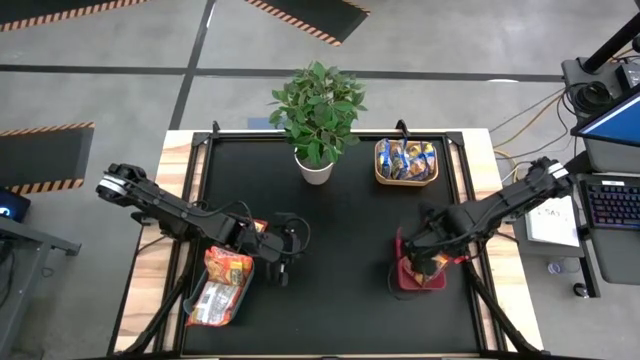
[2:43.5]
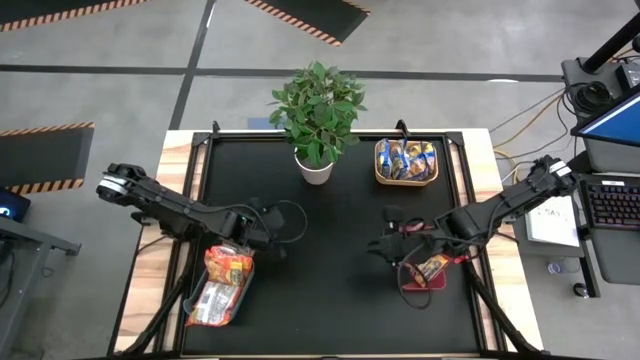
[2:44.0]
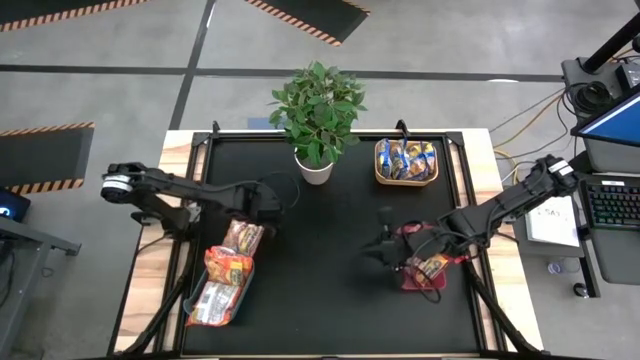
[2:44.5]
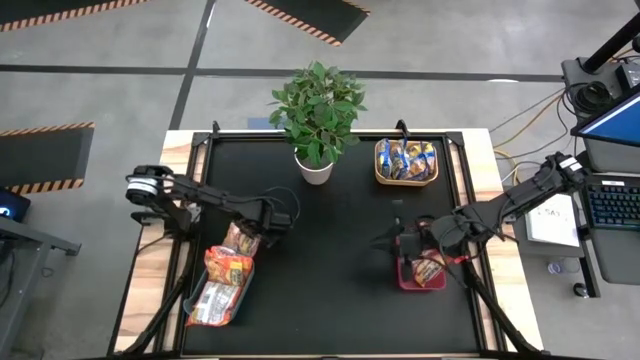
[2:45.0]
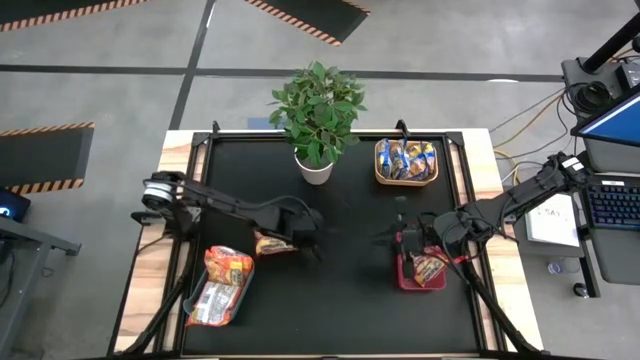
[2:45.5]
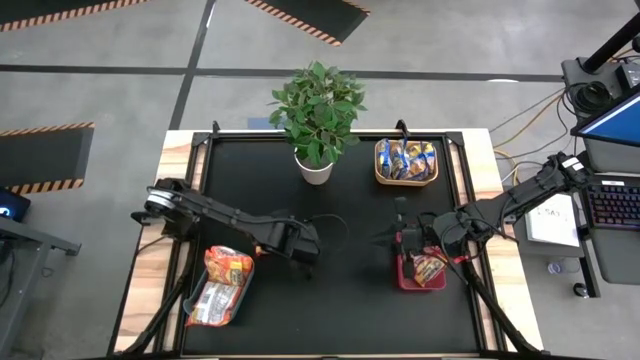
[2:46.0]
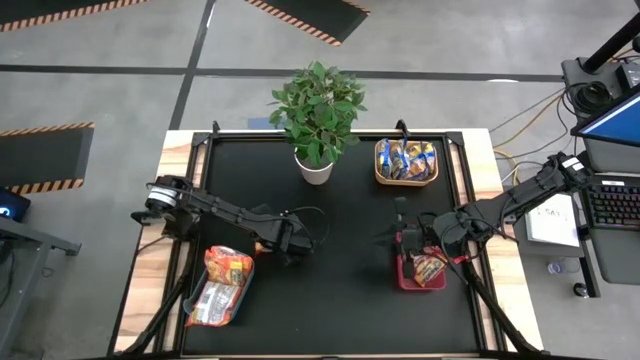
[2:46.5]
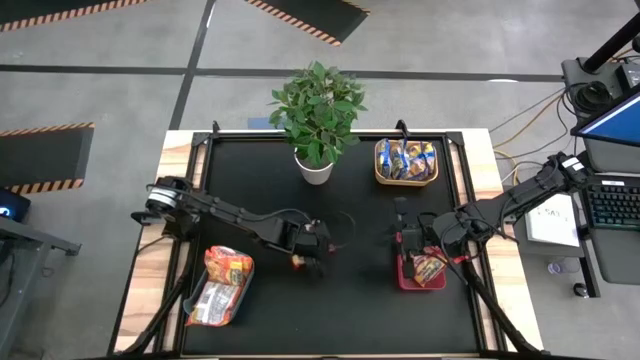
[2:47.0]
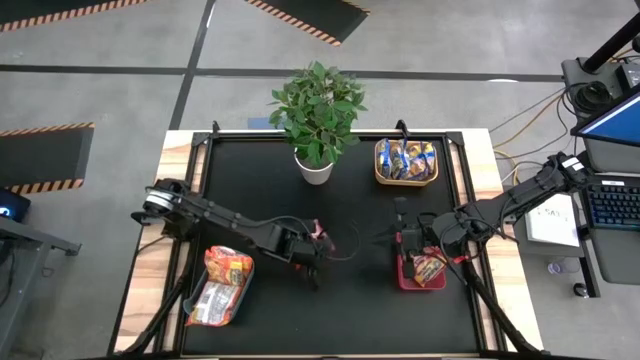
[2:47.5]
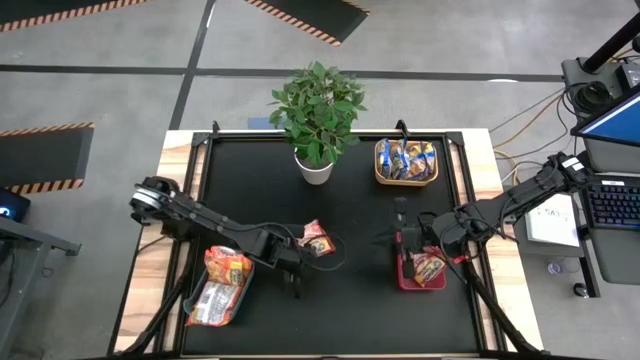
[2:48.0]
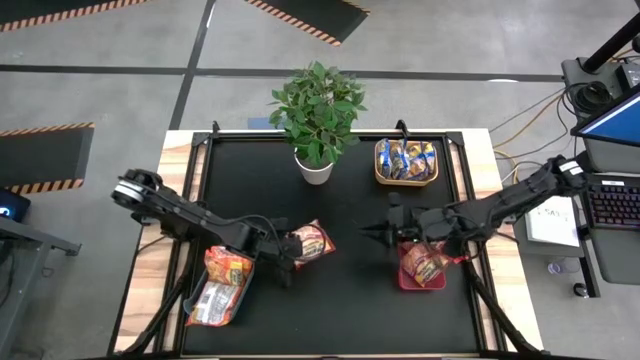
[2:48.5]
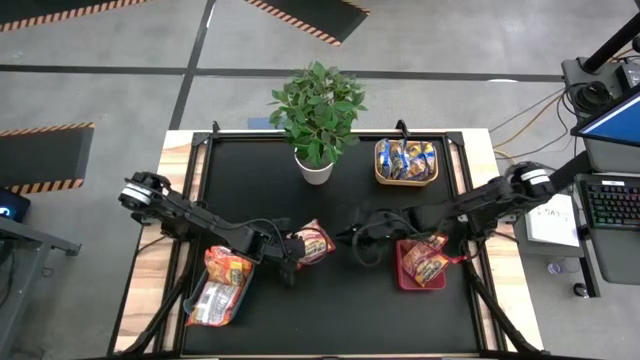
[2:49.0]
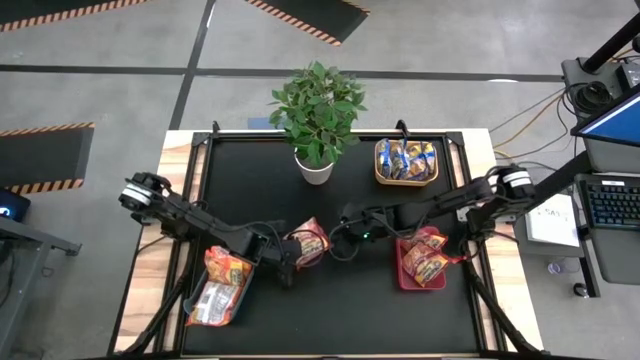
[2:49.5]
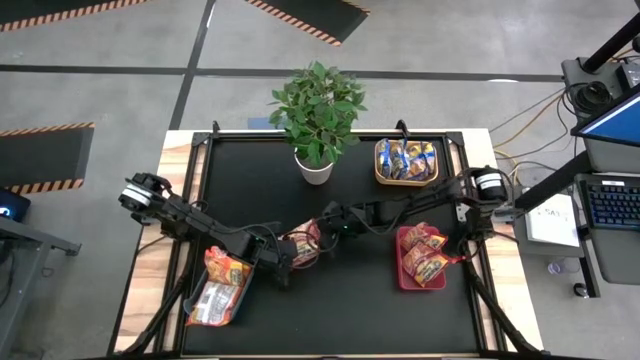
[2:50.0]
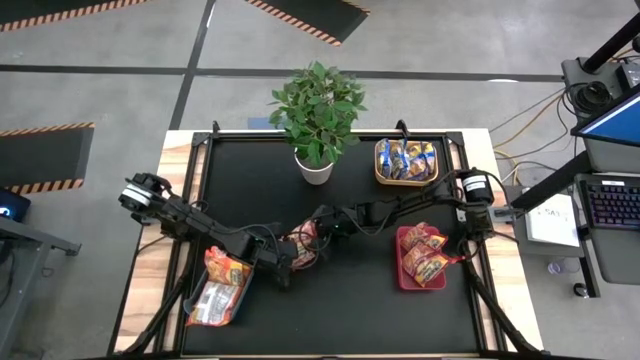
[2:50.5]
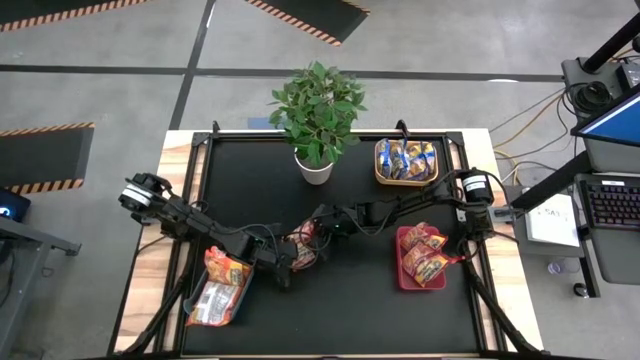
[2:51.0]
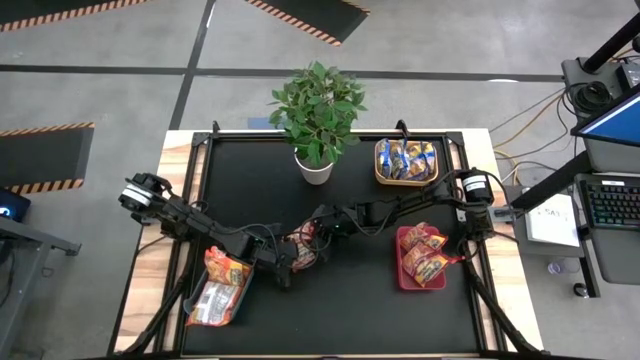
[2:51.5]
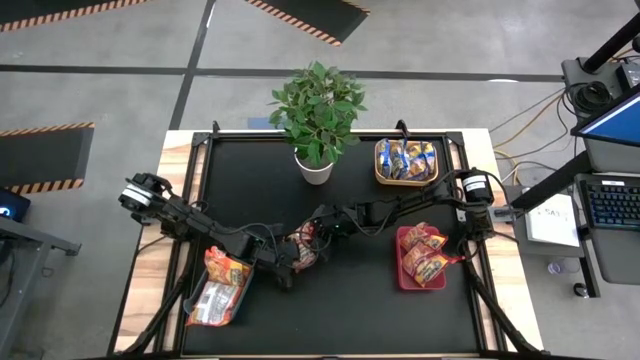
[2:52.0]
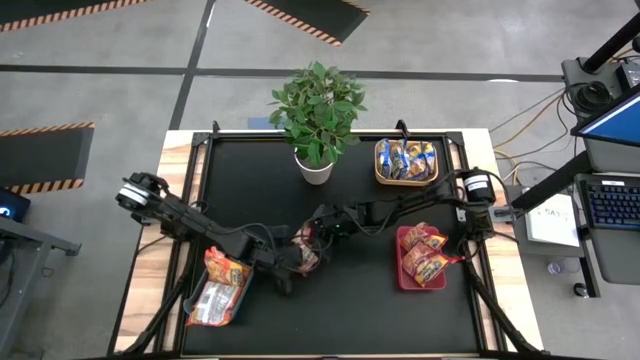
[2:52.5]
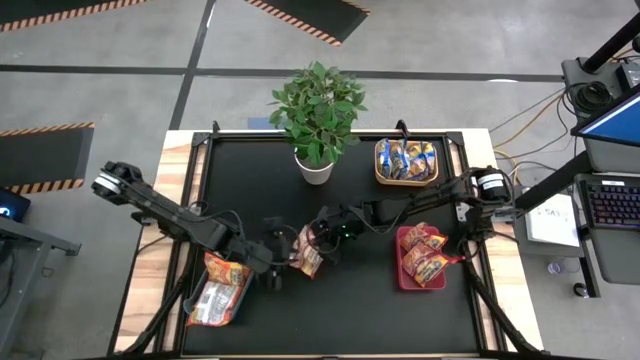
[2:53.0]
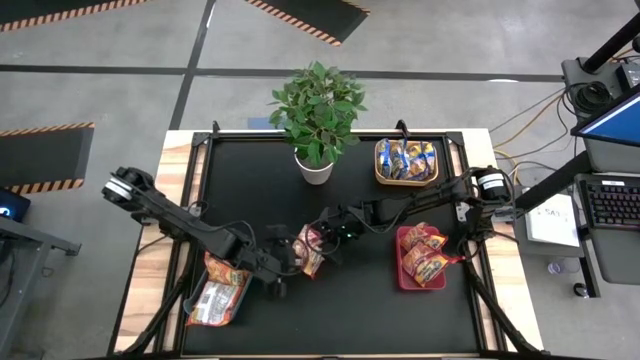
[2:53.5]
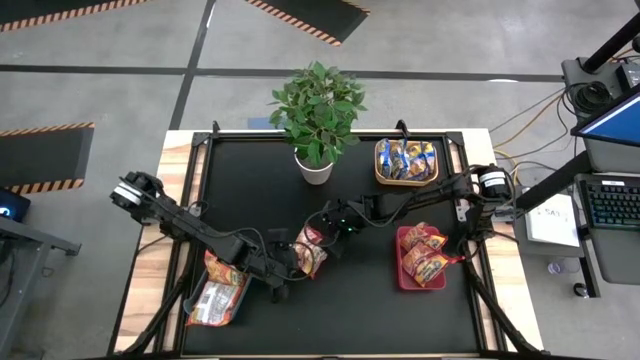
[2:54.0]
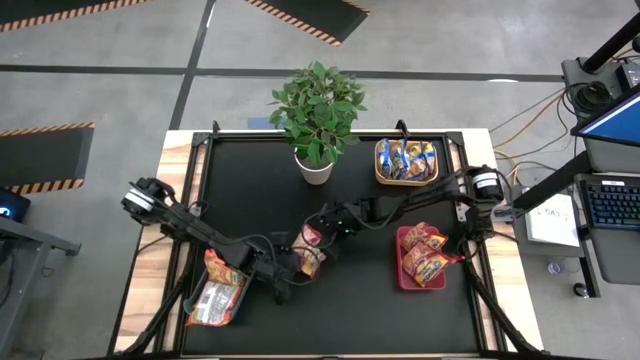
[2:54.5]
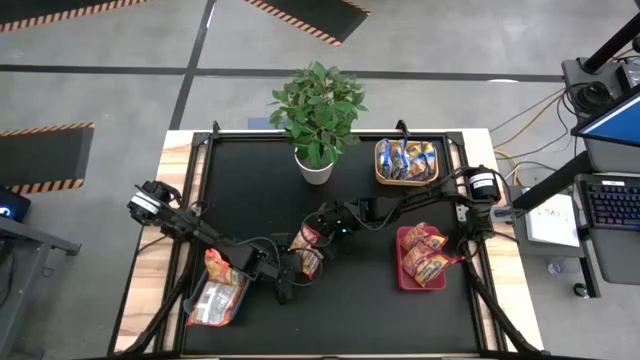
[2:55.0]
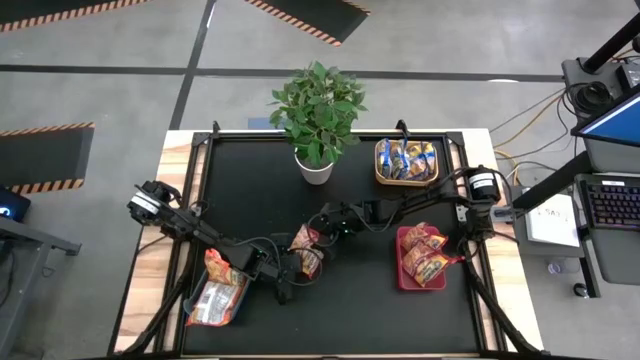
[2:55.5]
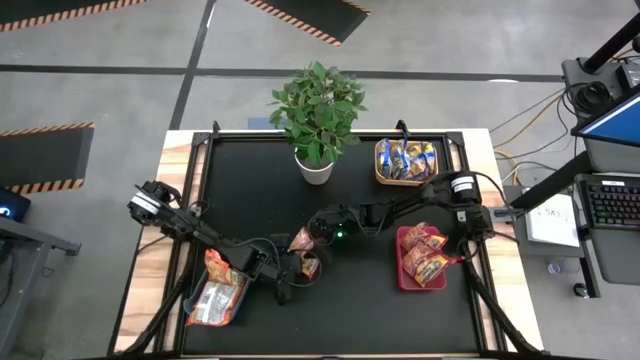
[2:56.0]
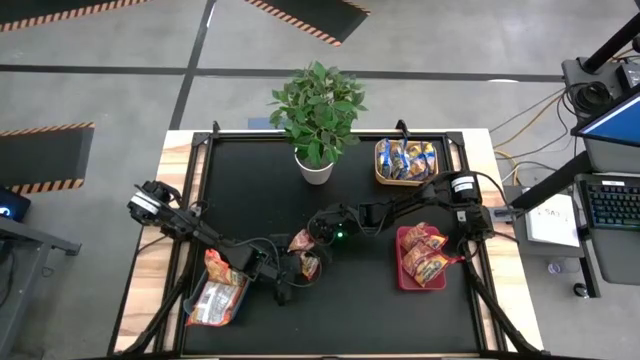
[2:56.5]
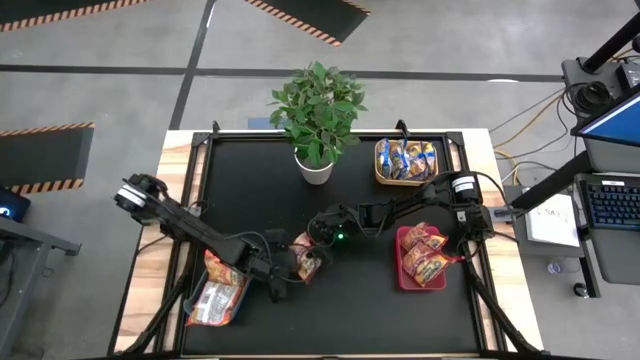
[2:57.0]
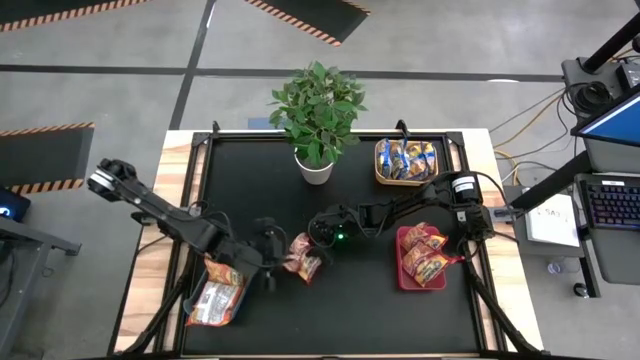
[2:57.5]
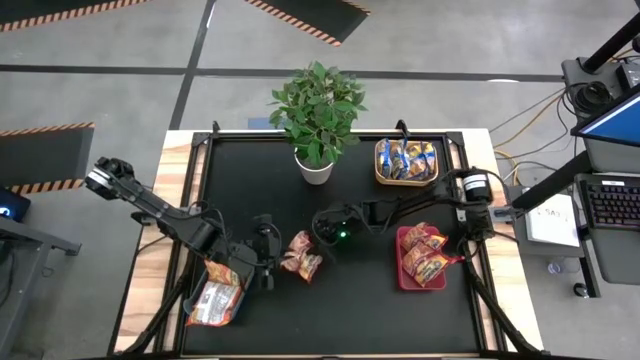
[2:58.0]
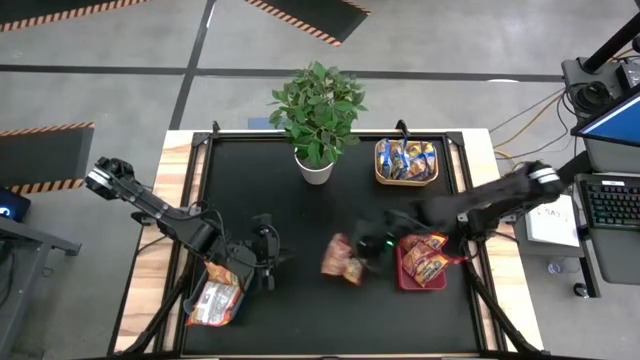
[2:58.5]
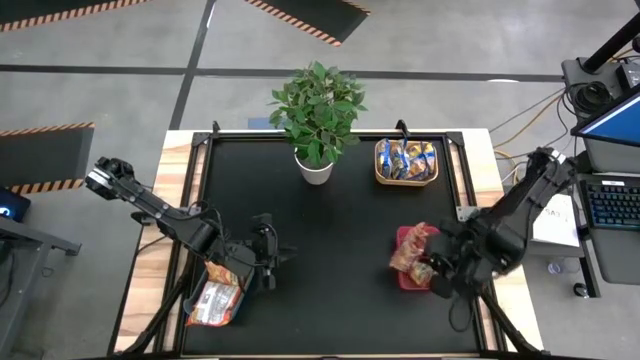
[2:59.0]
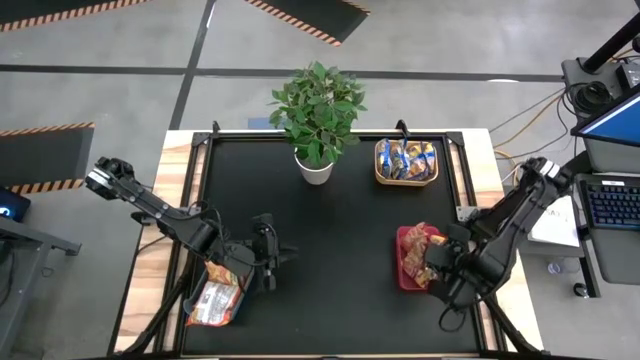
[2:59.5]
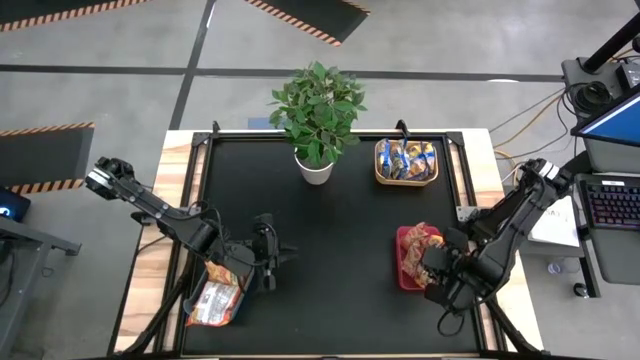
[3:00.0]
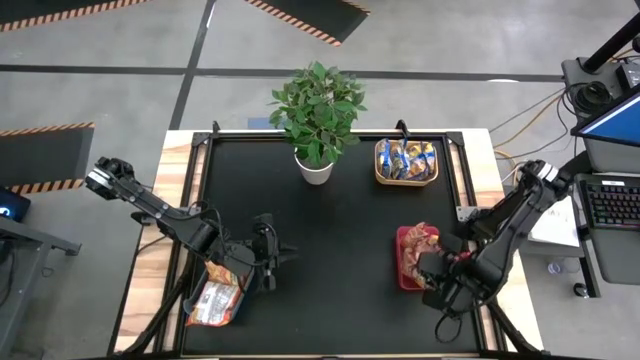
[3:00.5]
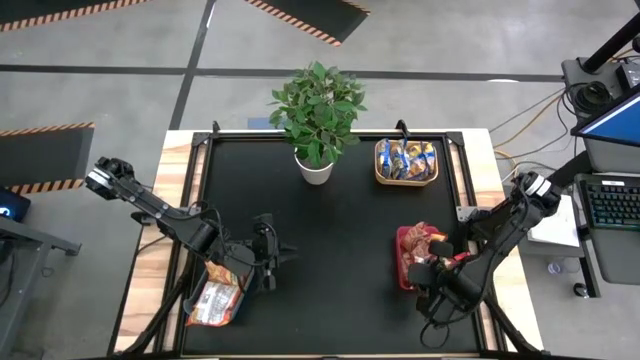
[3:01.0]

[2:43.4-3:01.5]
Task: Sort Maruchan noodles
Put the red noodle pack into the pink bin

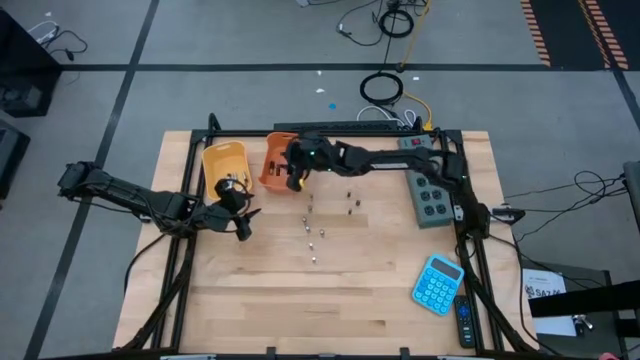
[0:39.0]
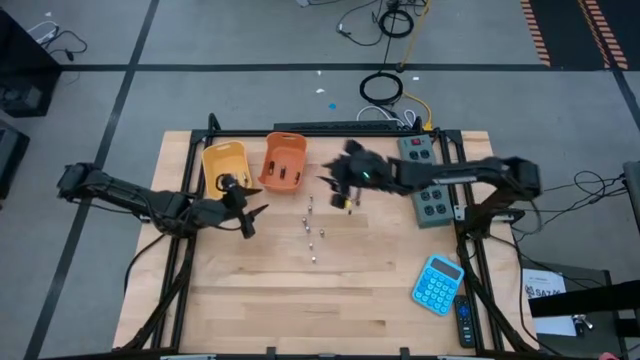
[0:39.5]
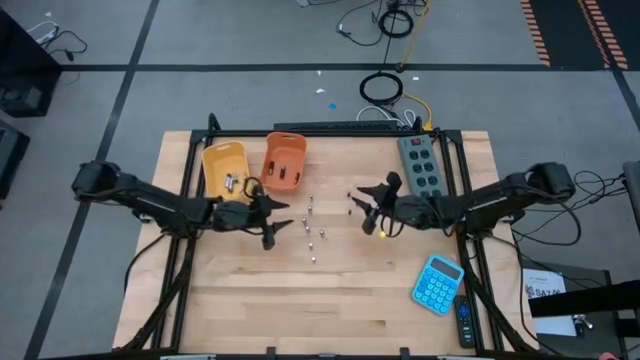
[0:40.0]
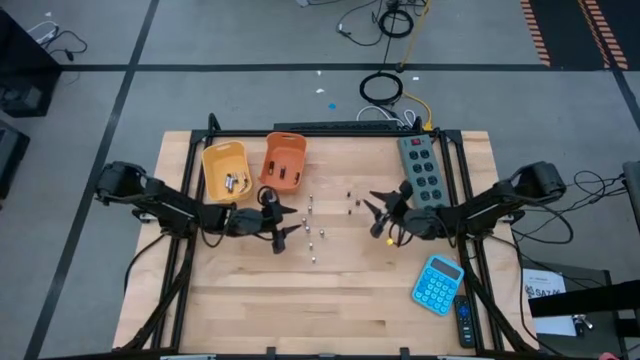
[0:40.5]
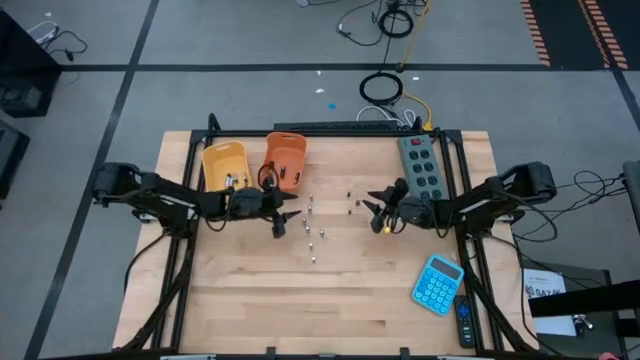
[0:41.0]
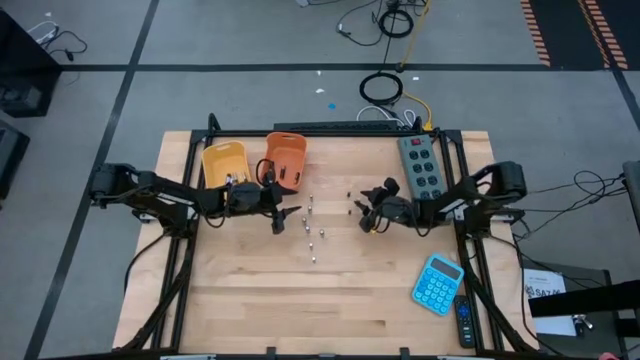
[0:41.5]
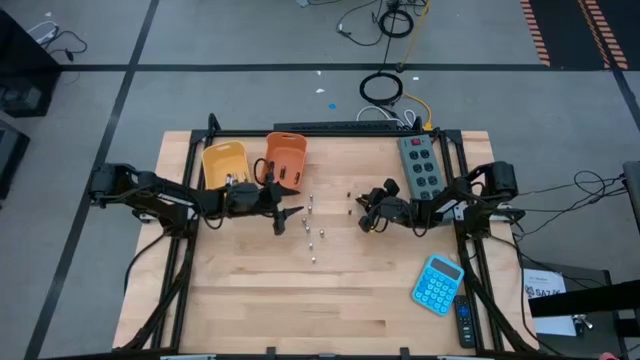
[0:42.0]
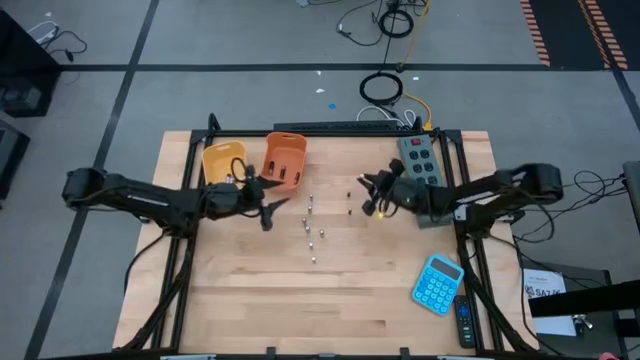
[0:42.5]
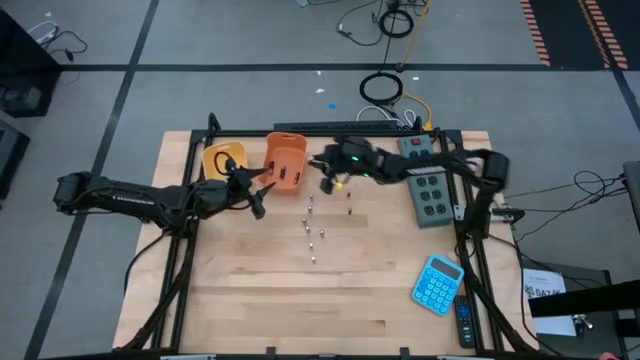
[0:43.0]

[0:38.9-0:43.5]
Task: Sort batteries
Put the black battery into the orange bin
